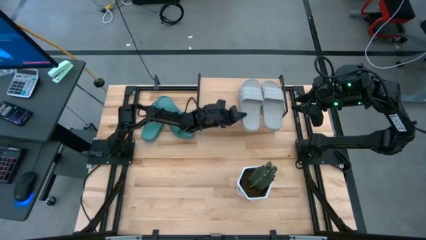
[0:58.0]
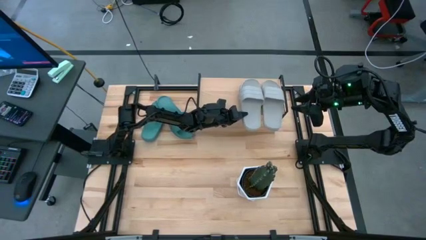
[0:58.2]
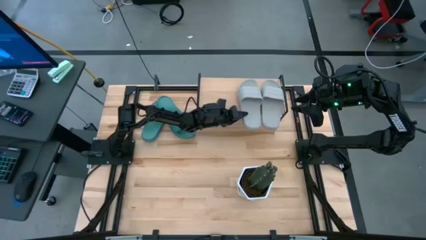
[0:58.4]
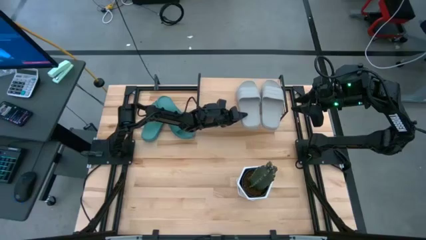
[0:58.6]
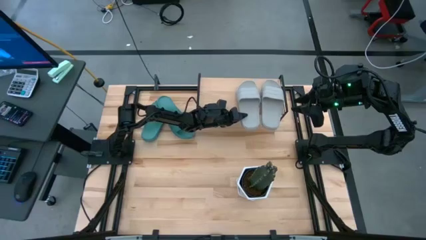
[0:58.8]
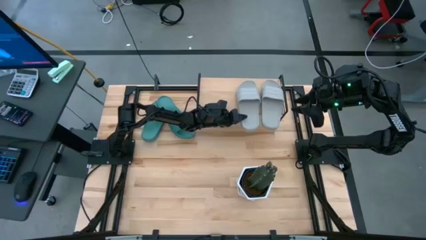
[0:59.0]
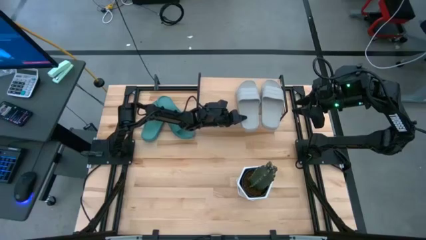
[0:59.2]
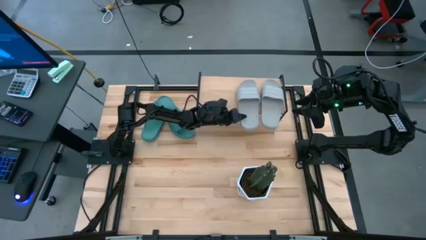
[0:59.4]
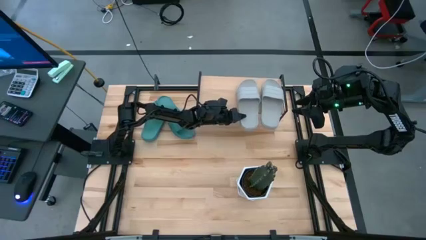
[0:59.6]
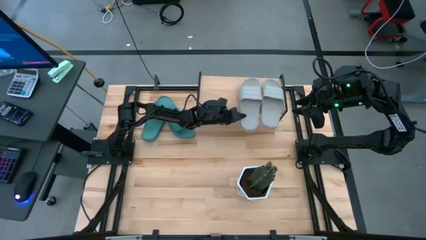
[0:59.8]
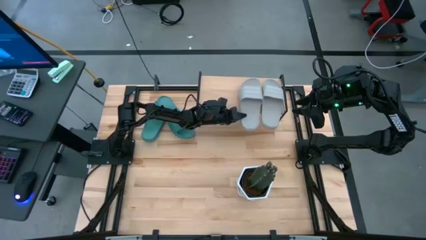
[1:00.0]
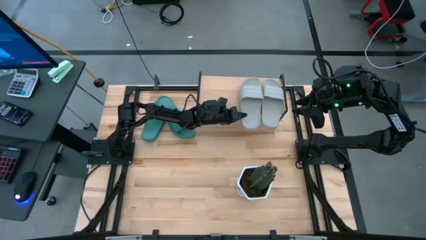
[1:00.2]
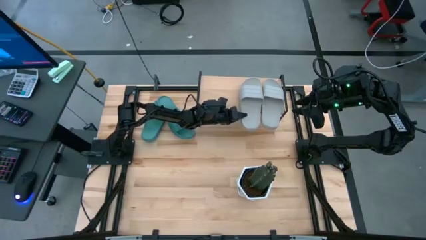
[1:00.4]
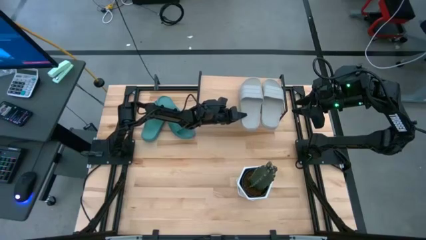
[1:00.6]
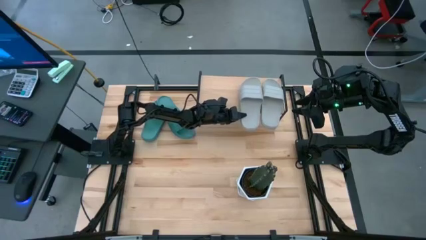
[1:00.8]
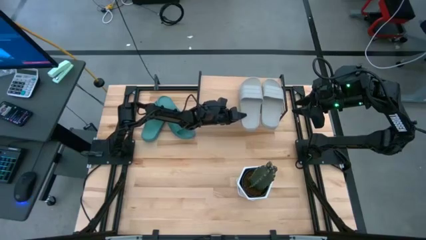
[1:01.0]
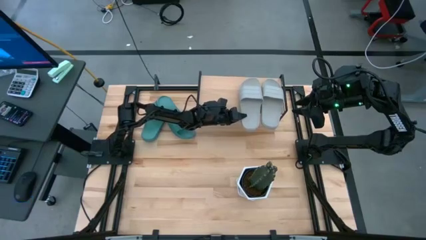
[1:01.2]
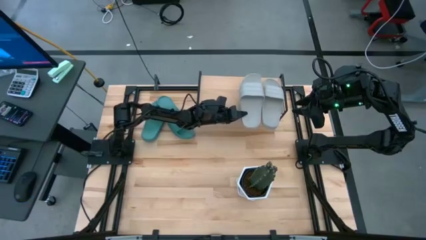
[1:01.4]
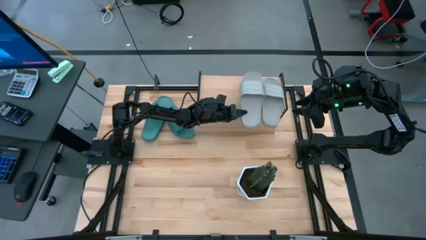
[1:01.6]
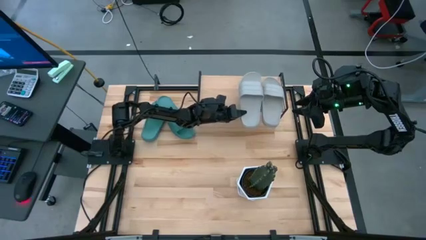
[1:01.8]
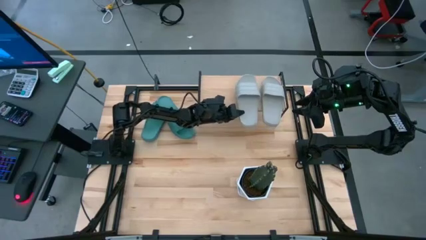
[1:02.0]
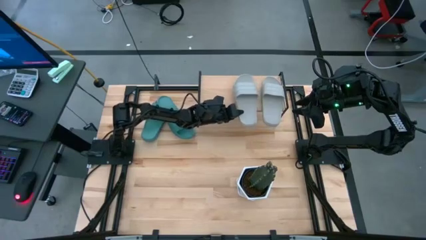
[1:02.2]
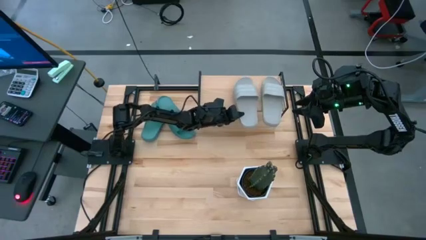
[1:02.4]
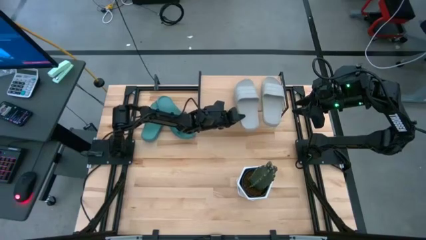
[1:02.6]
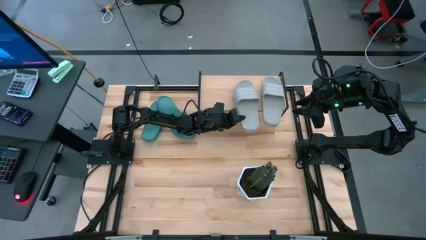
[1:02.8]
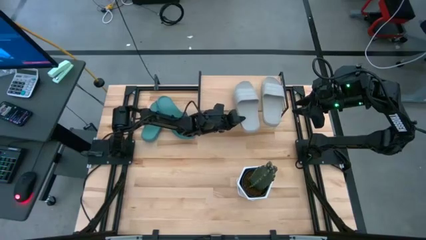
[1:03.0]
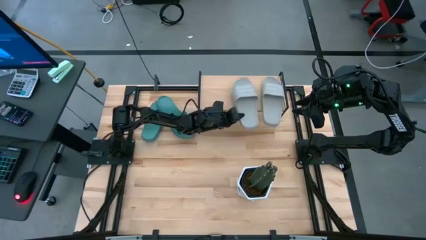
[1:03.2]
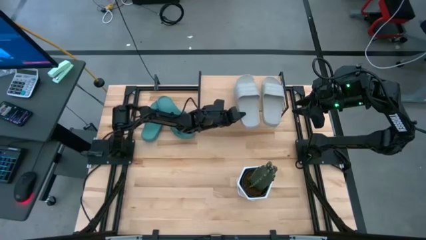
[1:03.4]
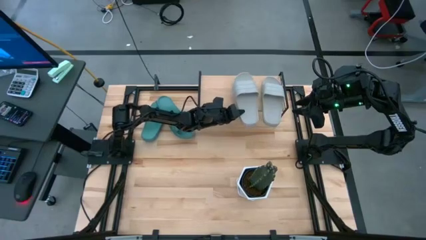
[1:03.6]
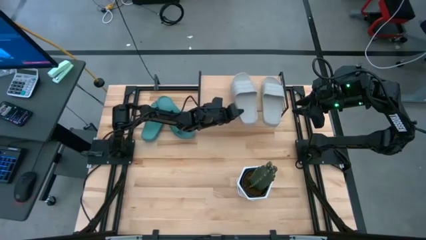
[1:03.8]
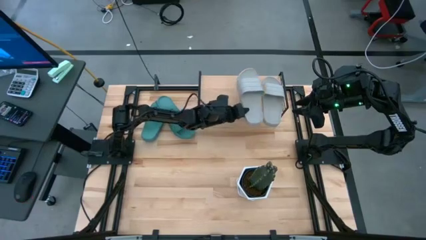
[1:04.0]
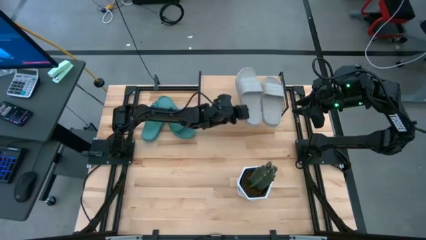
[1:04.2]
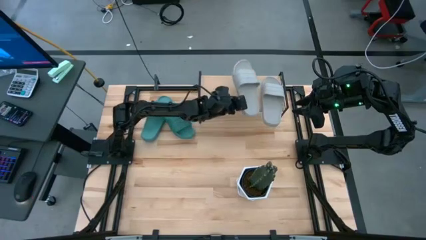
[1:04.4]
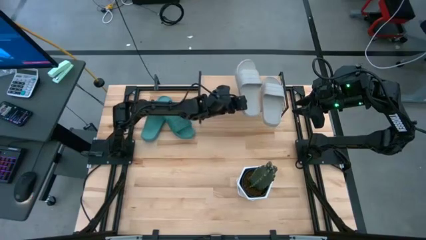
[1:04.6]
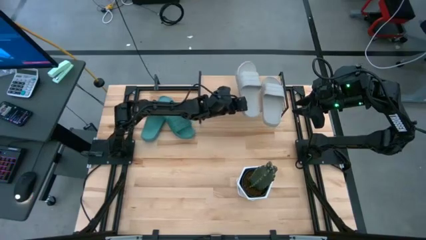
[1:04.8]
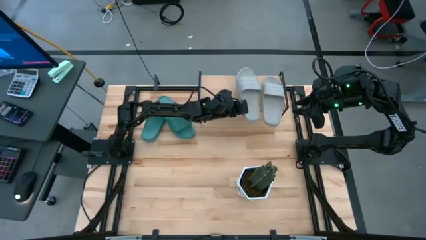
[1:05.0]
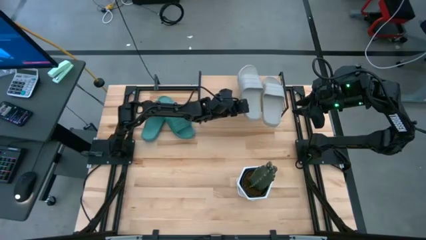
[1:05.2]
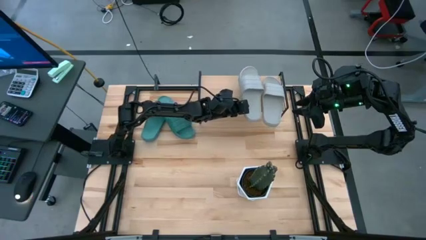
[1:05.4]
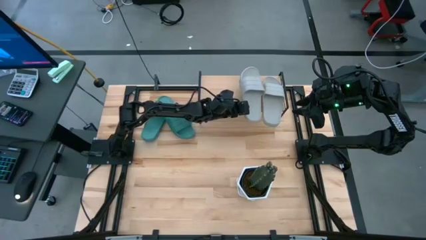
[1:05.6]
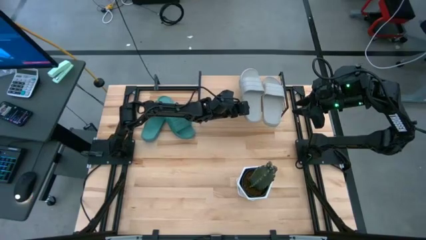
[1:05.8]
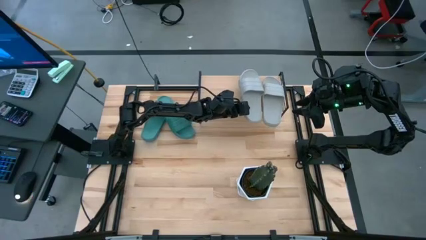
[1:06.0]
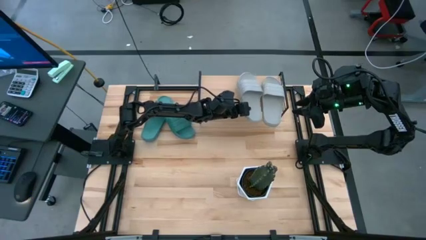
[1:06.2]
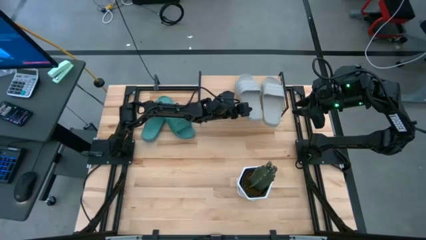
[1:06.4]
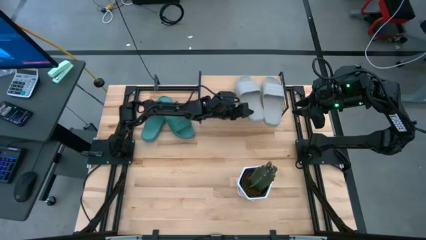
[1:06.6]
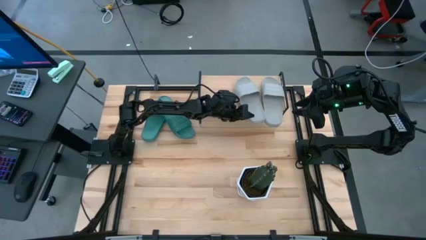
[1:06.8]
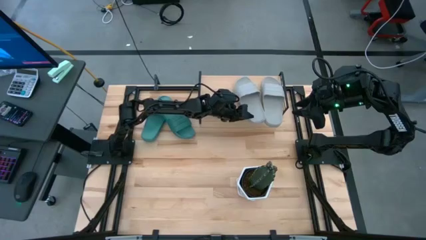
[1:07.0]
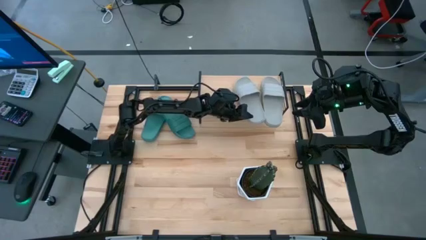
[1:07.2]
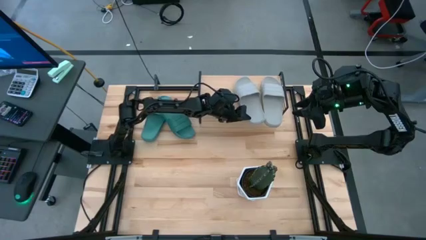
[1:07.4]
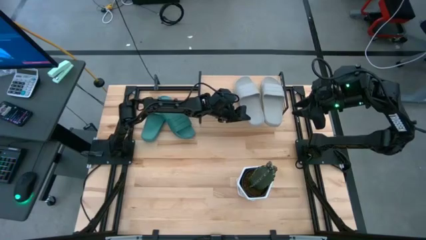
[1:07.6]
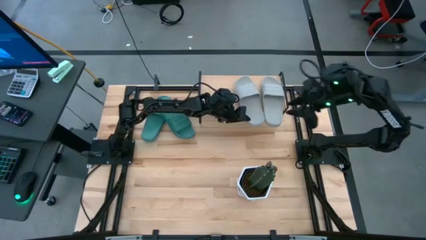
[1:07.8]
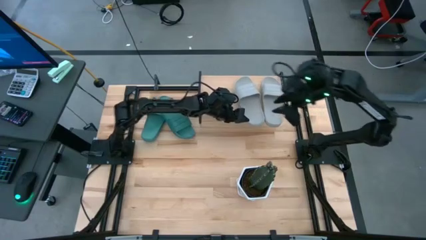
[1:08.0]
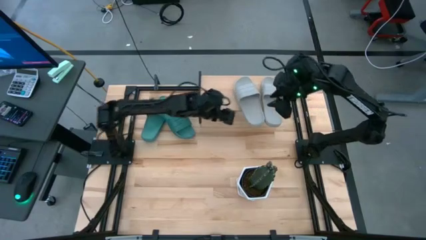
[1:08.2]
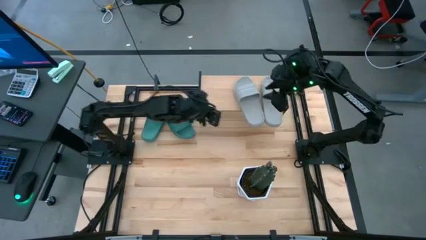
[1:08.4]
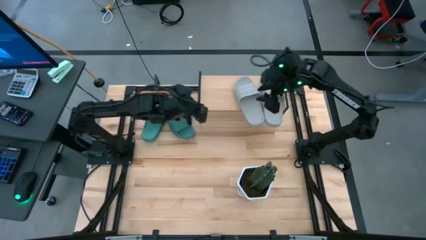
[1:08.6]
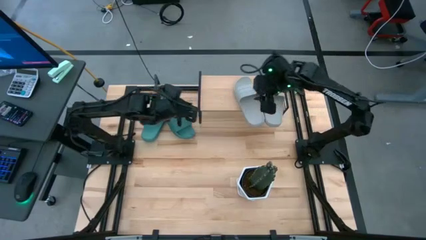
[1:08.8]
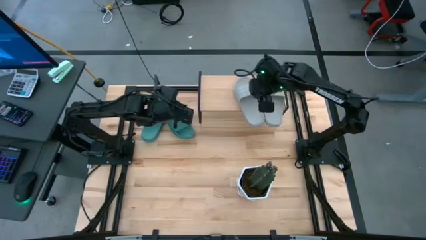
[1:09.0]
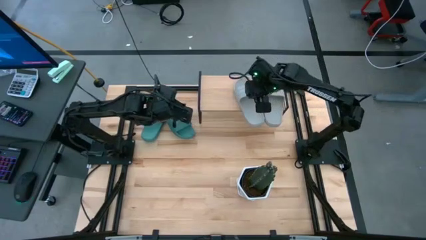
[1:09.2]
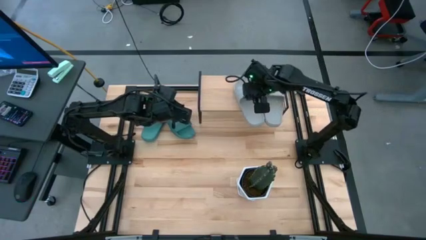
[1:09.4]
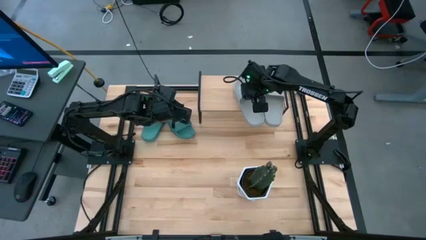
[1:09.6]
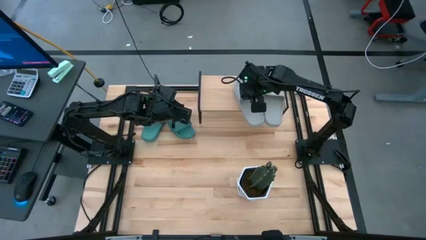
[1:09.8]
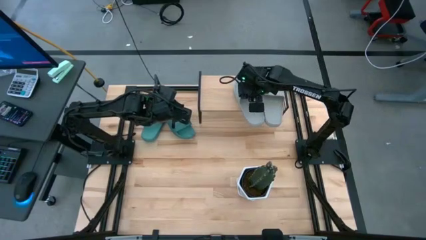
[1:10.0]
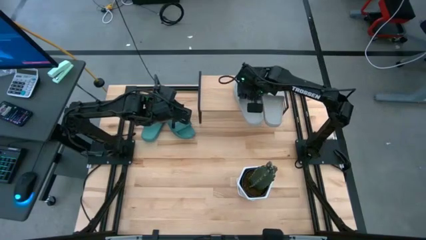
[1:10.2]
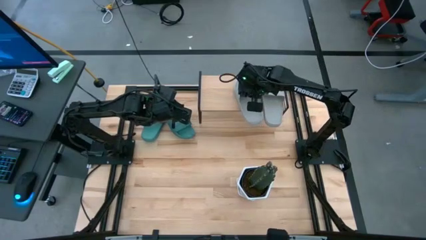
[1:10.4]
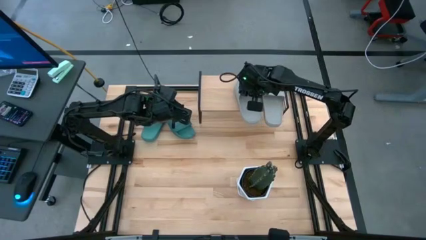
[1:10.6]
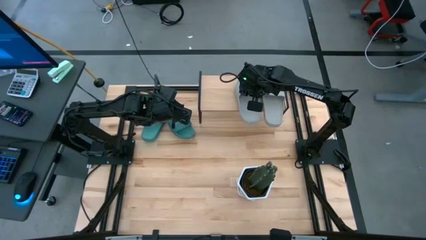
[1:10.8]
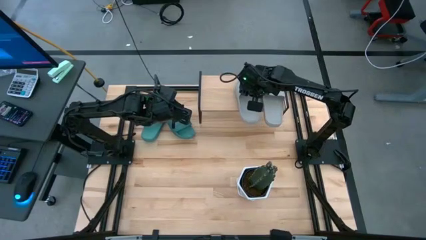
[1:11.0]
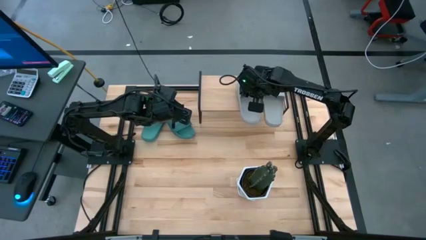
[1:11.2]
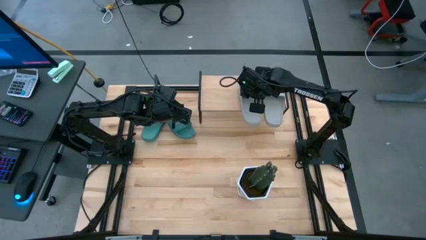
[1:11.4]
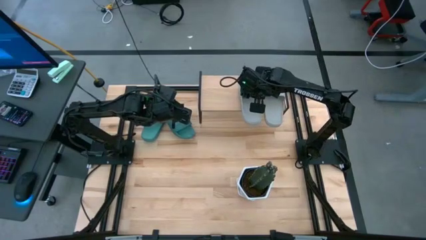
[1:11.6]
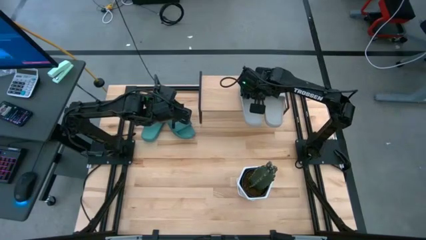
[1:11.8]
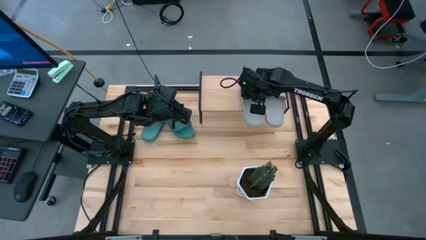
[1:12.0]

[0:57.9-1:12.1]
Task: Pick and place slides into the shelf
Put the gray slipper on the shelf
